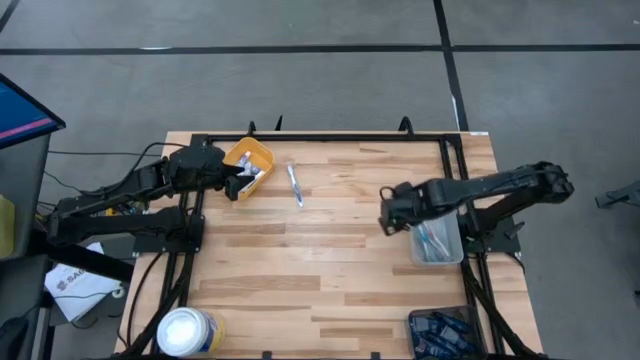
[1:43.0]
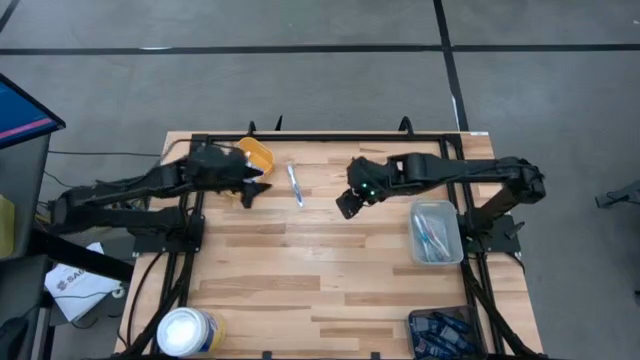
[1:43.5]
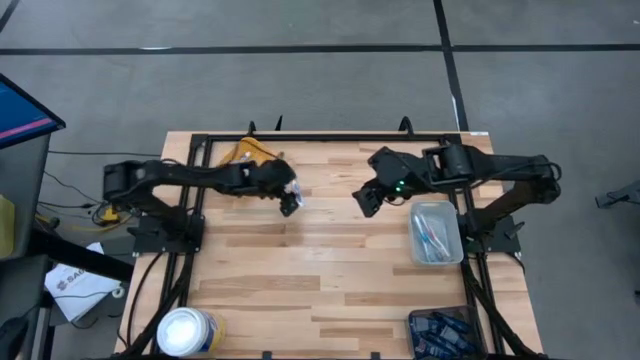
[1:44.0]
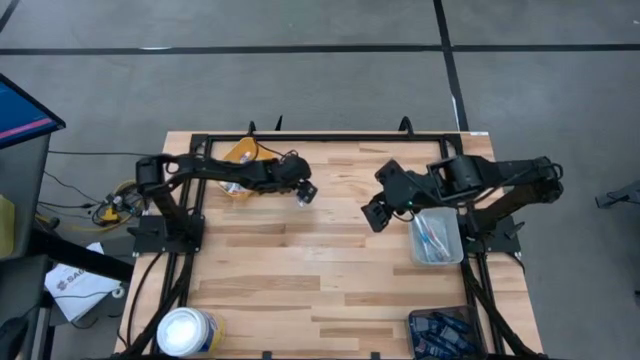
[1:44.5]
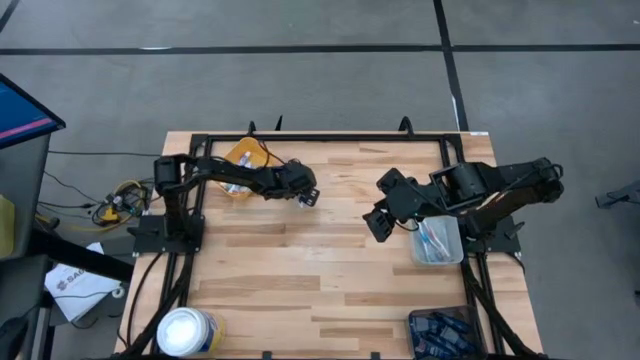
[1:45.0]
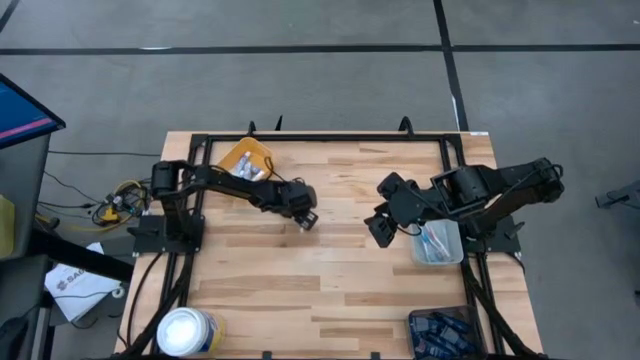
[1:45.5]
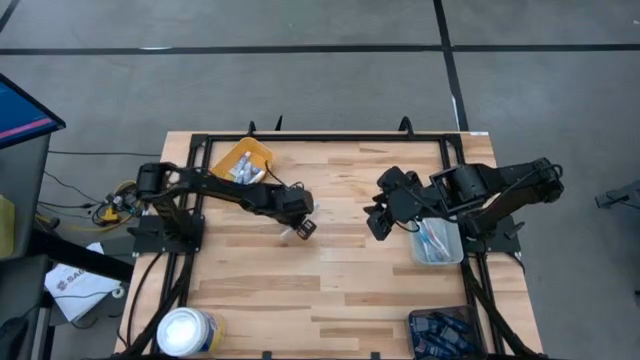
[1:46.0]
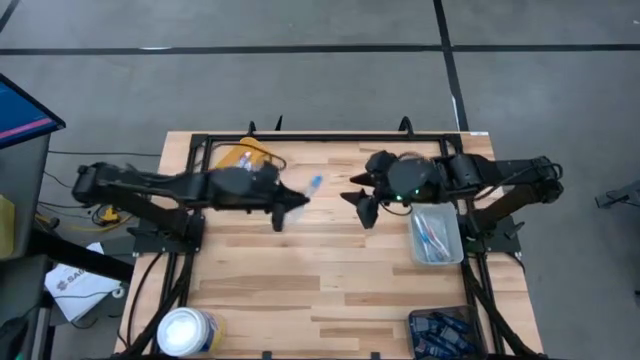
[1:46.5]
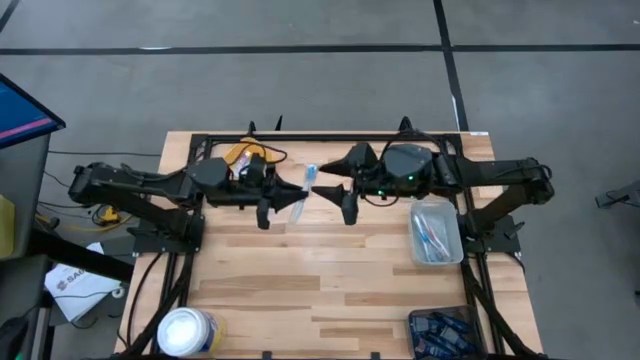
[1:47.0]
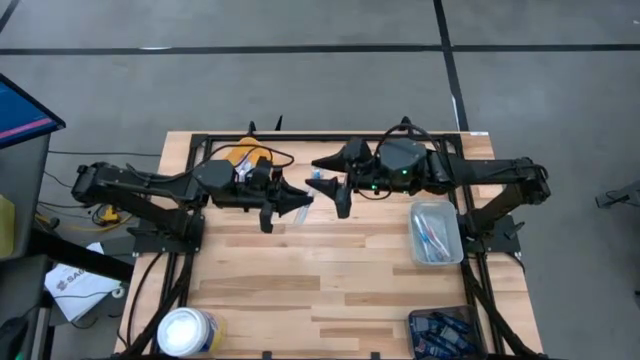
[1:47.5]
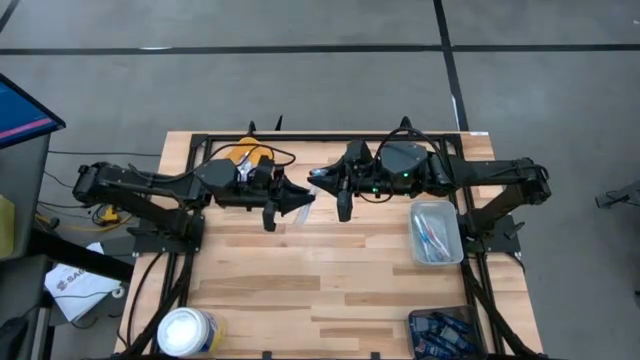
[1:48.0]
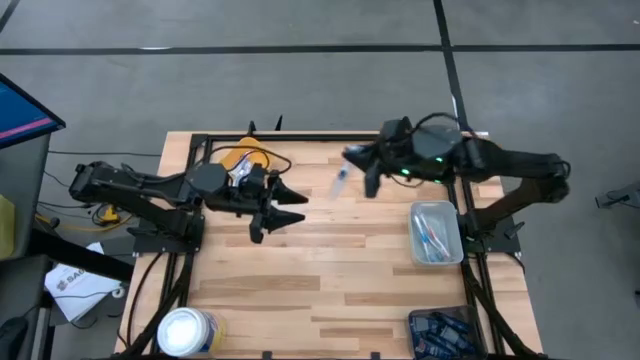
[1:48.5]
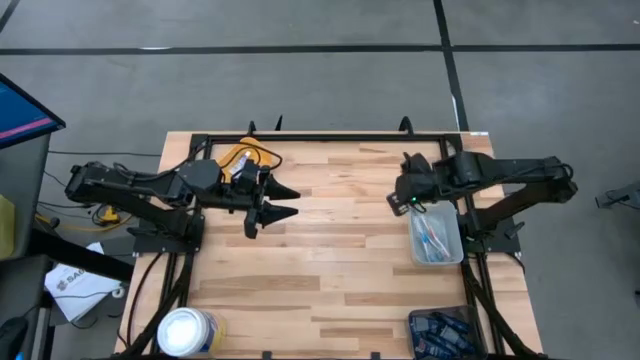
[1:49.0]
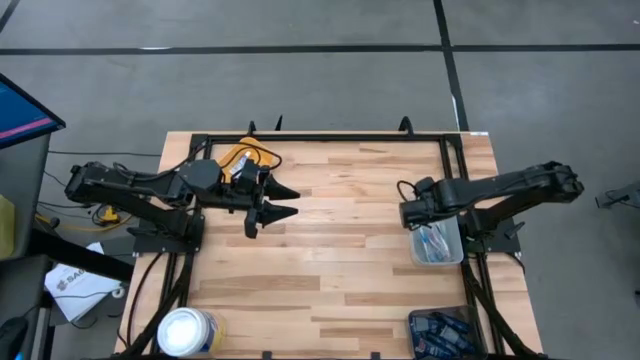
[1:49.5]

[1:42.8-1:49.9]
Task: Pick & Place Travel size toiletries
Put the dark blue toothbrush into the gray bin

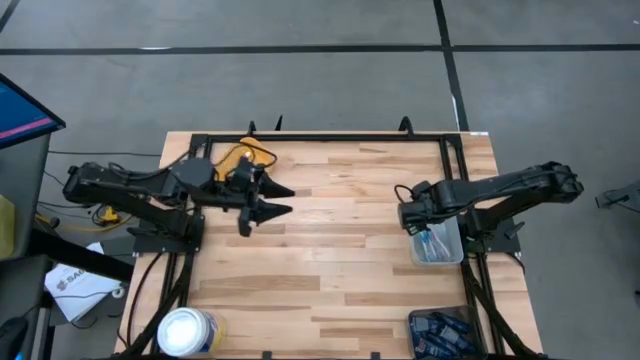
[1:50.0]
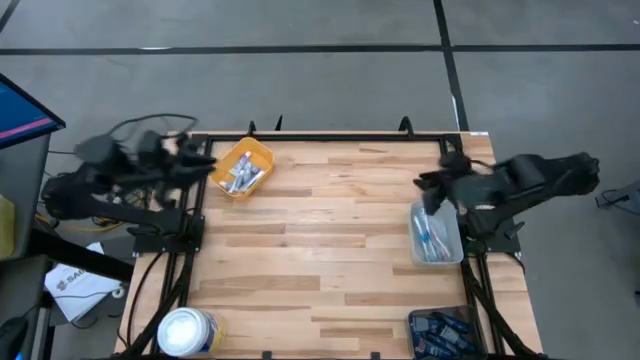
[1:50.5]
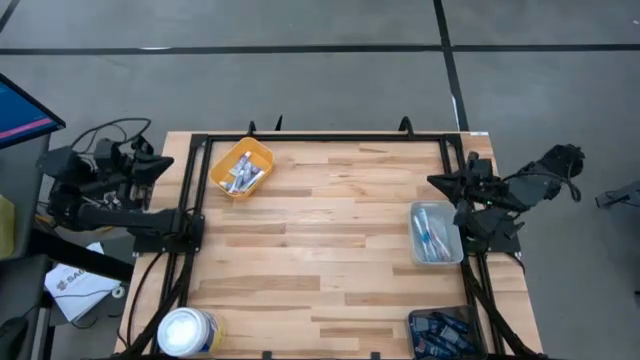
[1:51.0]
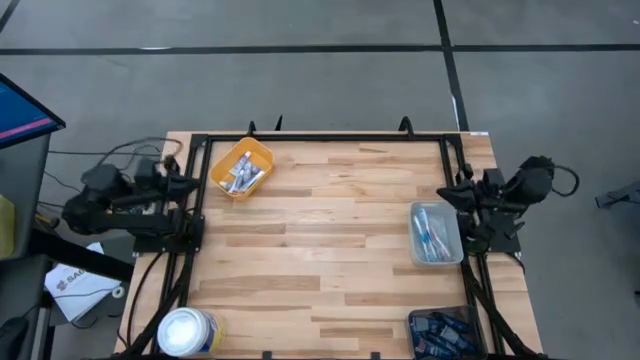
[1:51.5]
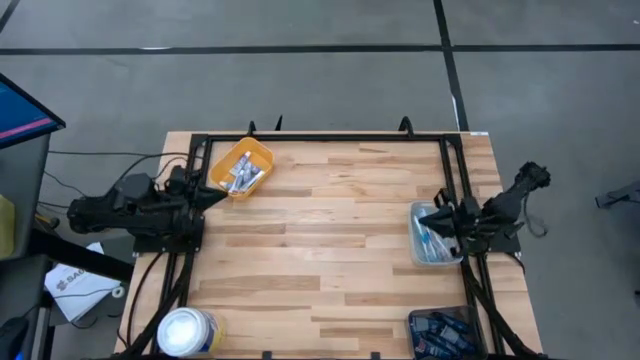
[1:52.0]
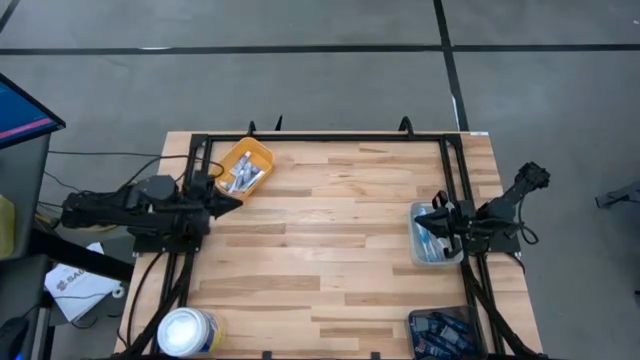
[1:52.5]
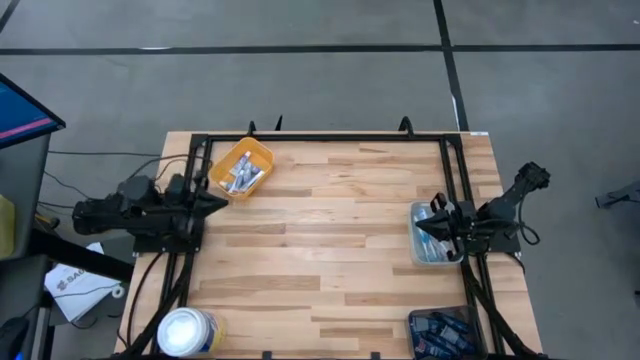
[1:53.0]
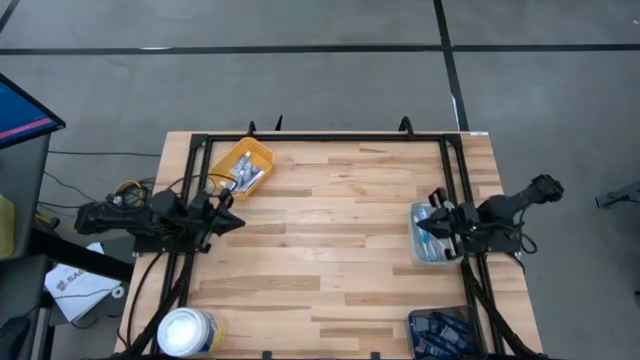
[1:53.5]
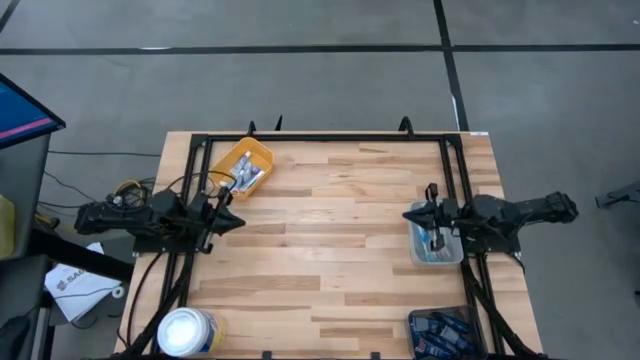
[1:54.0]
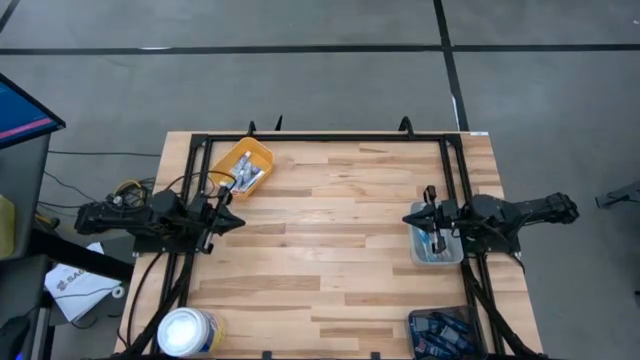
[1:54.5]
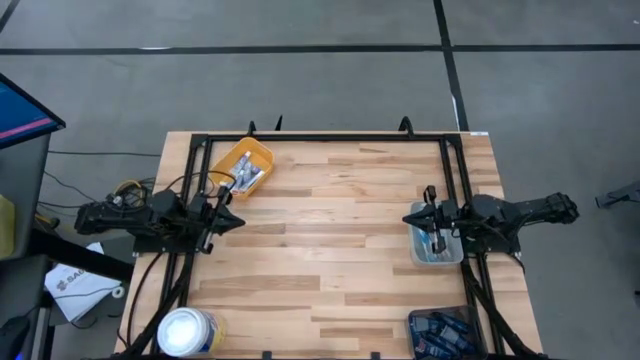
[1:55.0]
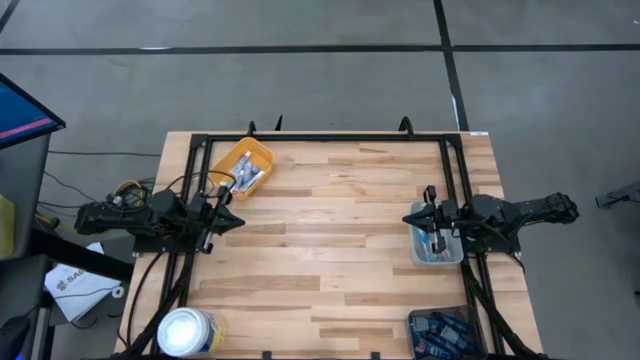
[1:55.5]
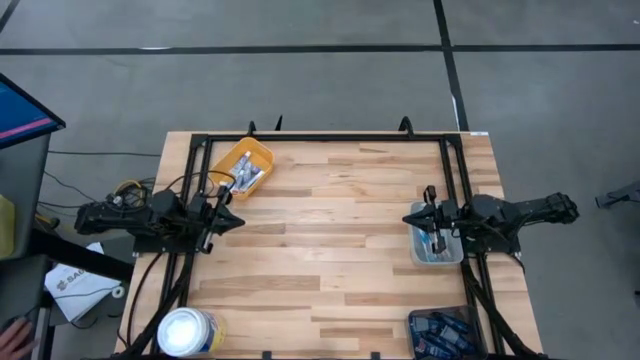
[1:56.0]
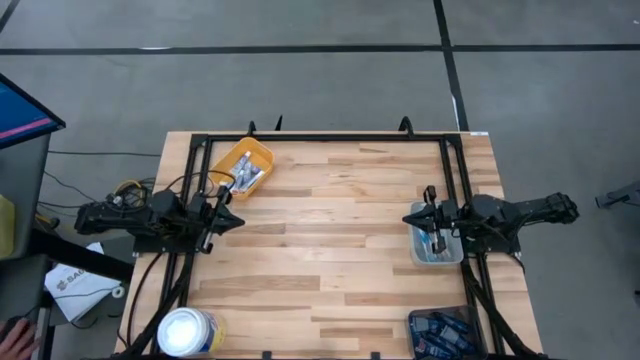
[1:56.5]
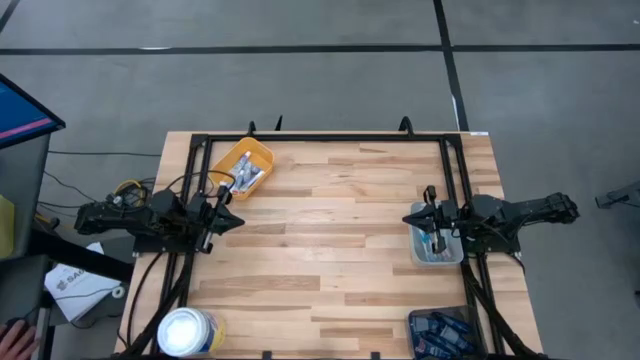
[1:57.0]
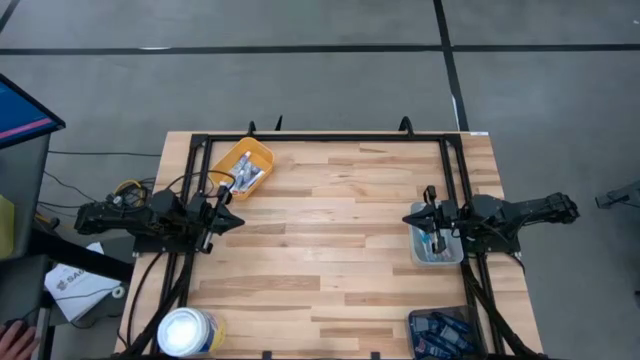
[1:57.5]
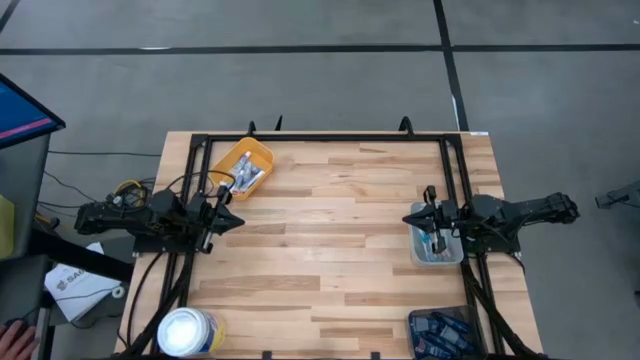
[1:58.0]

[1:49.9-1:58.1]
Return to Home Position

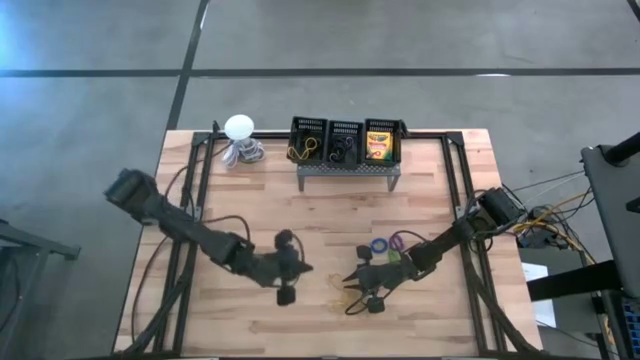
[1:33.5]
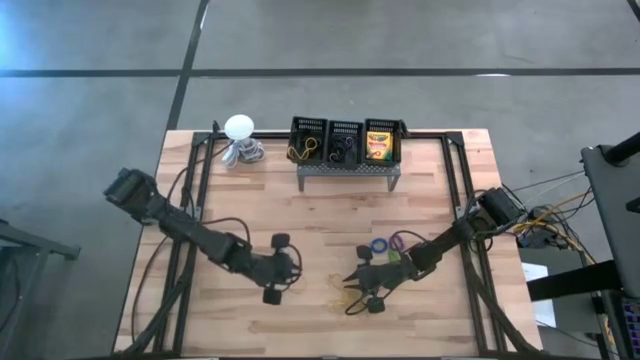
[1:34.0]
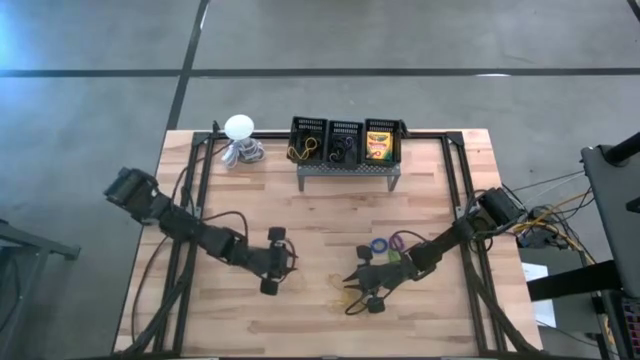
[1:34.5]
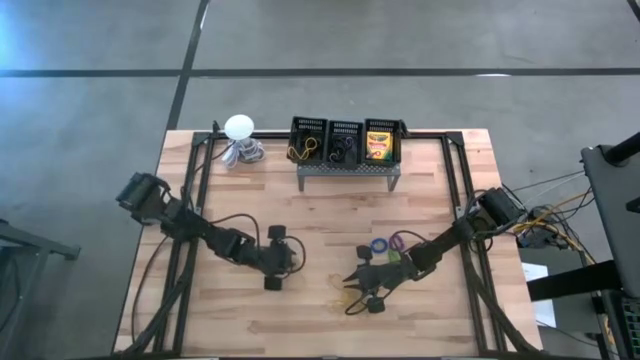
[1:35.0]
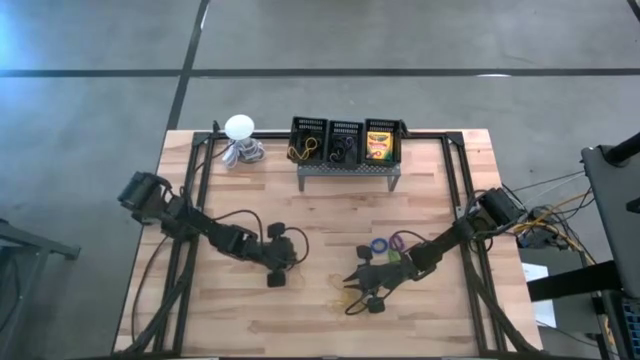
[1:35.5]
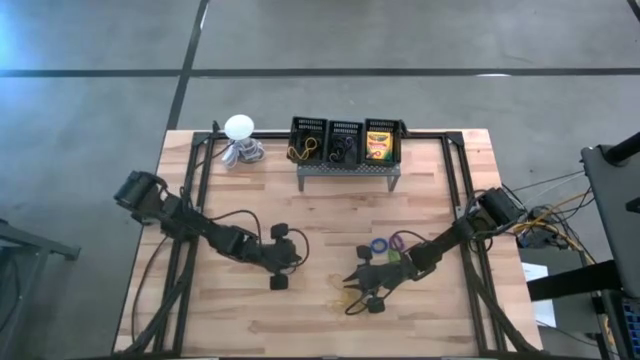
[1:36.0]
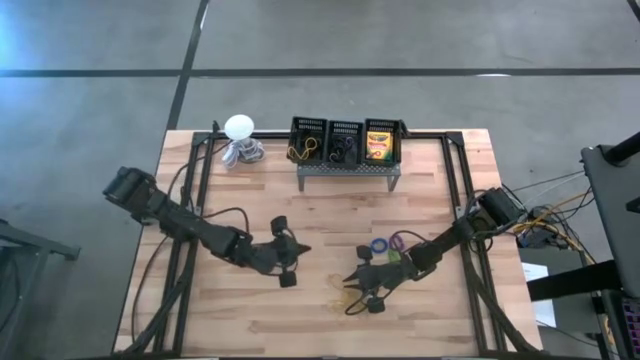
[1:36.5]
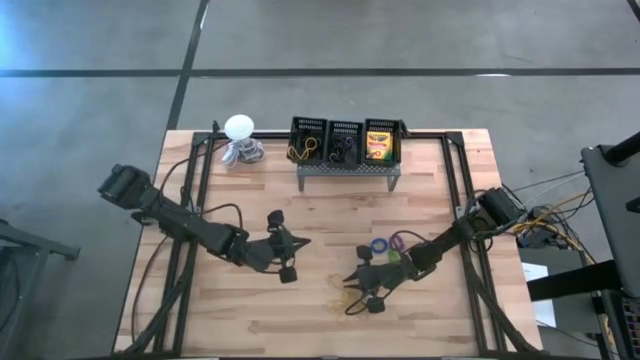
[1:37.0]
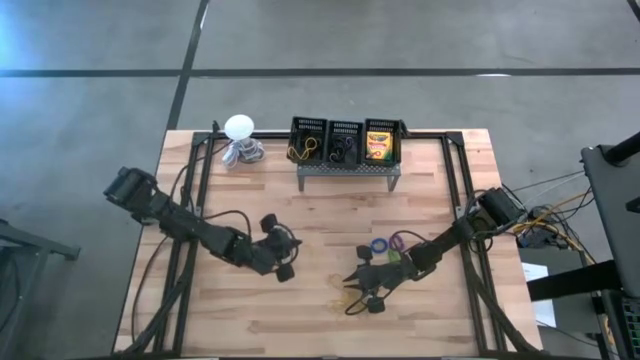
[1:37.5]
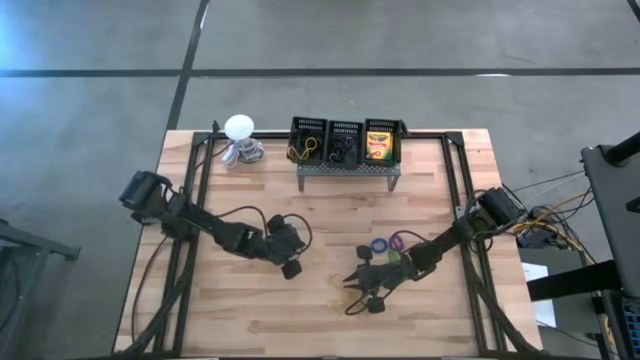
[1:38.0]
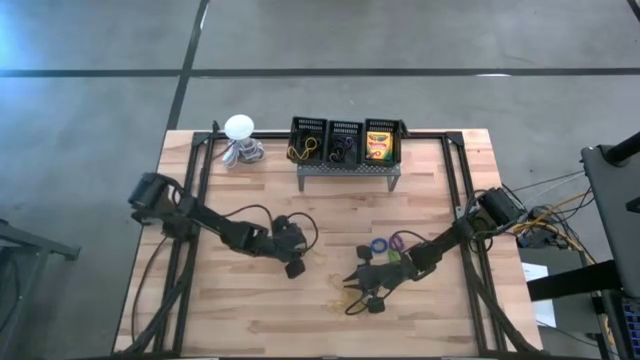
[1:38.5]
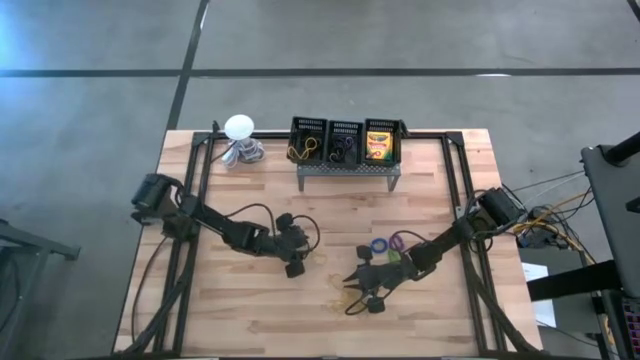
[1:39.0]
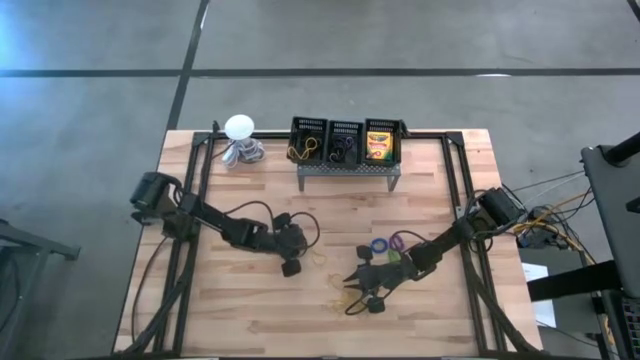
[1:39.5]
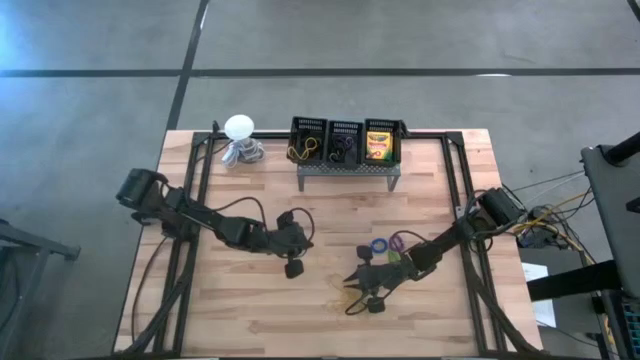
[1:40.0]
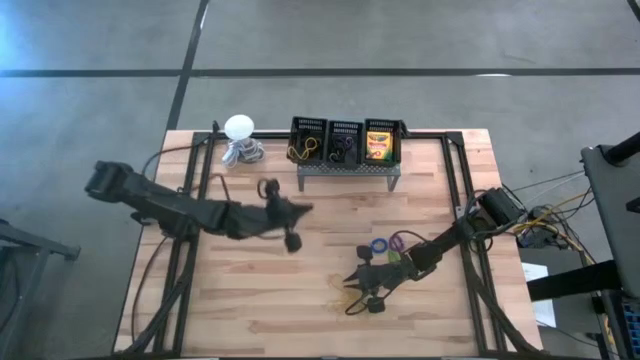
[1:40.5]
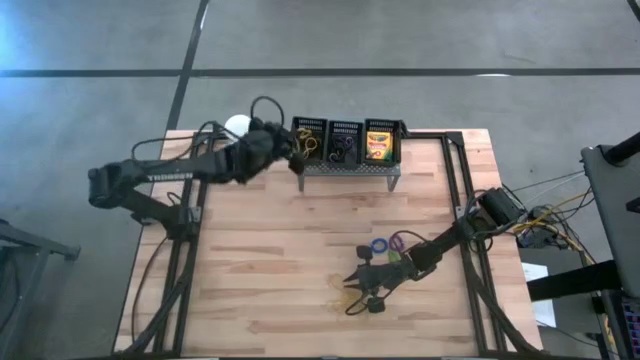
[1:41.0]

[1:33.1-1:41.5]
Task: Pick & Place Office Desk Supplies
Put the yellow rubber band into the left black bin on the shelf
